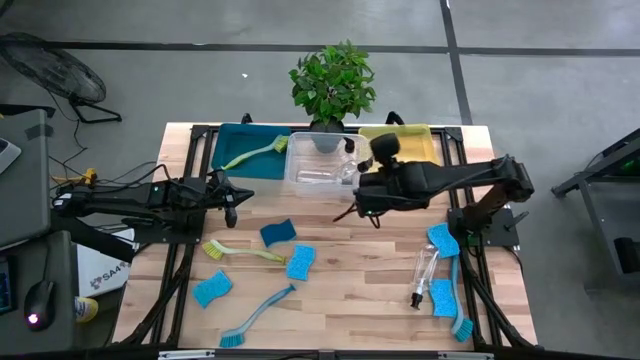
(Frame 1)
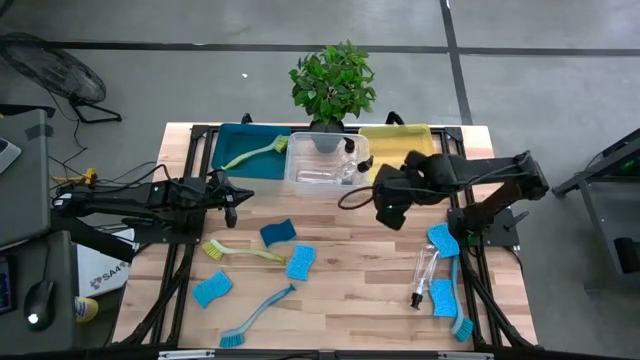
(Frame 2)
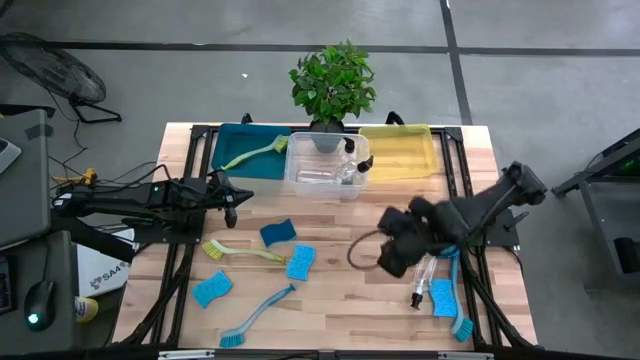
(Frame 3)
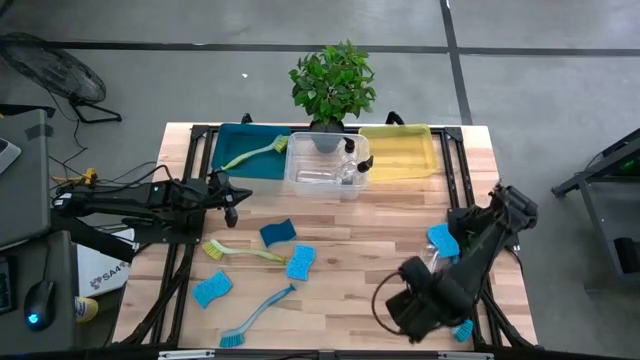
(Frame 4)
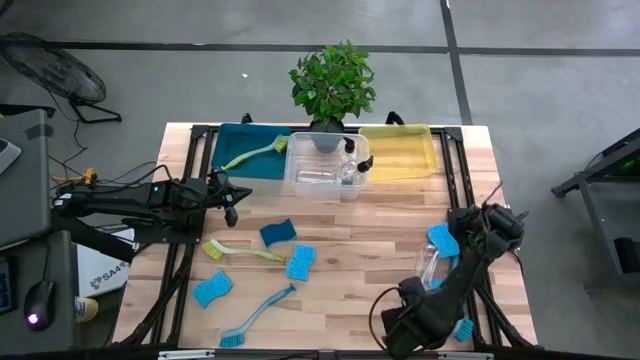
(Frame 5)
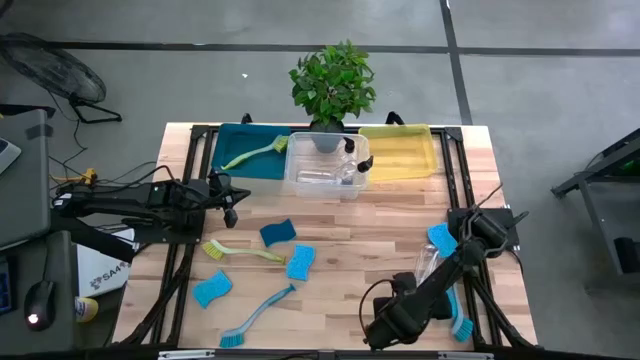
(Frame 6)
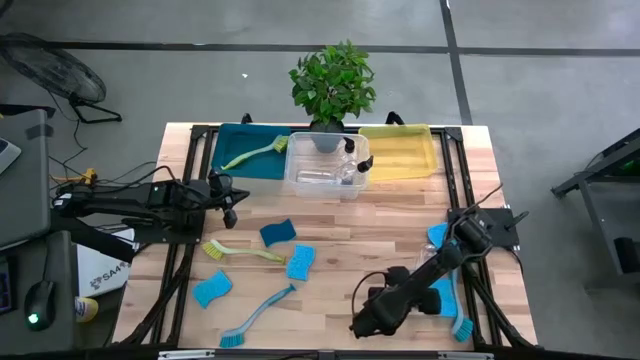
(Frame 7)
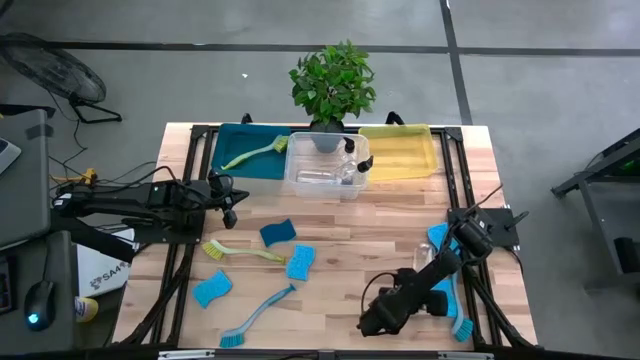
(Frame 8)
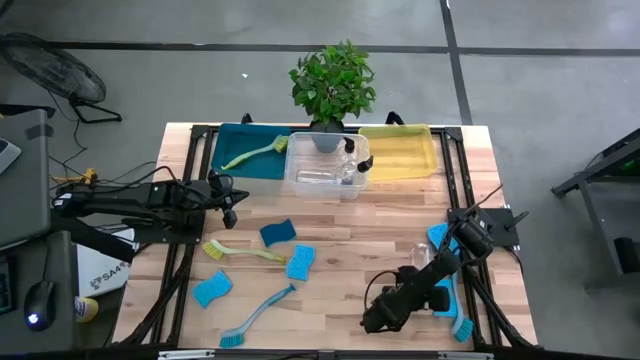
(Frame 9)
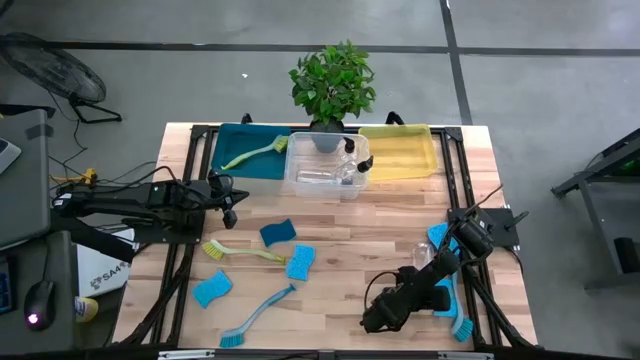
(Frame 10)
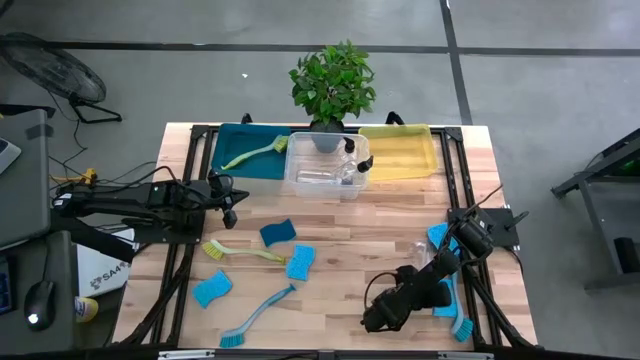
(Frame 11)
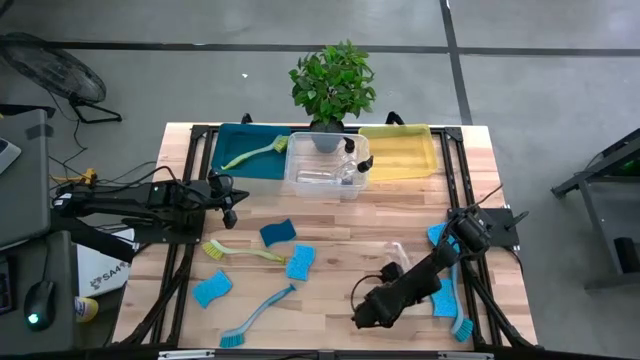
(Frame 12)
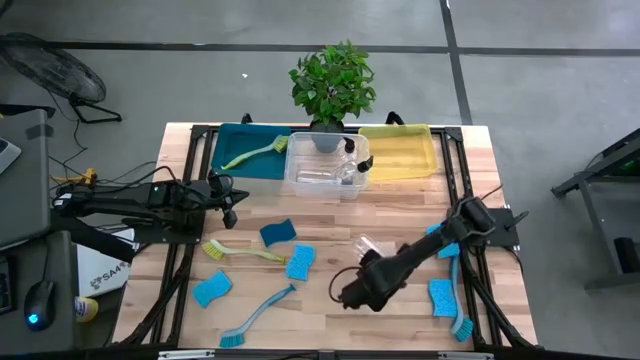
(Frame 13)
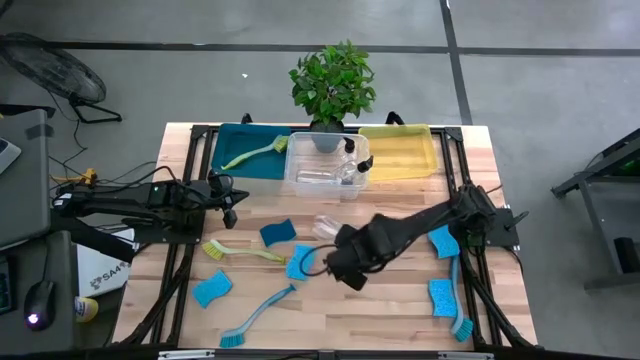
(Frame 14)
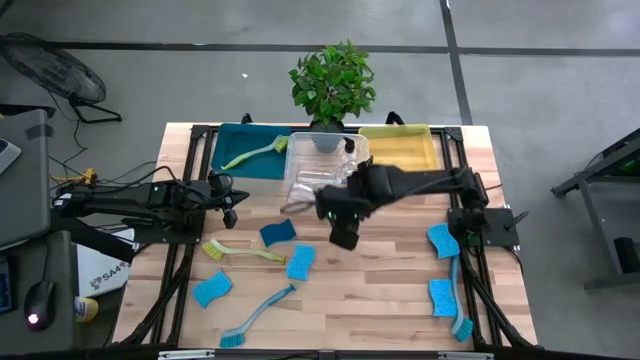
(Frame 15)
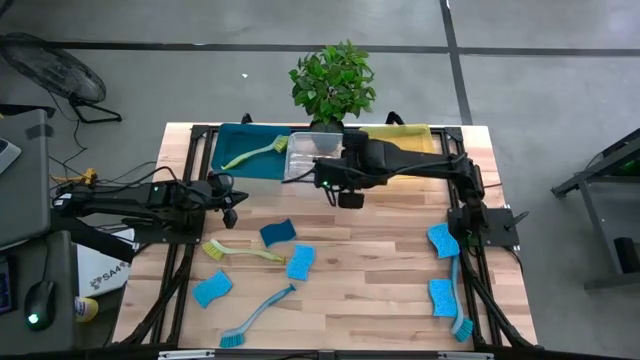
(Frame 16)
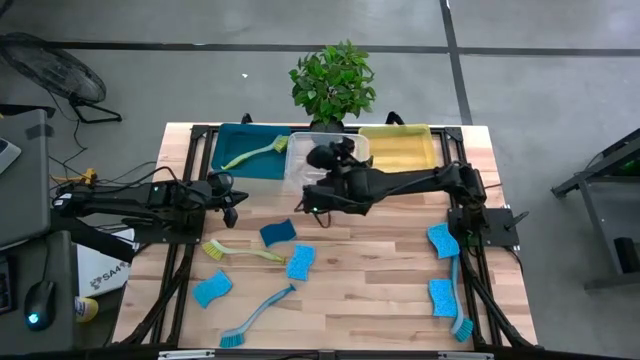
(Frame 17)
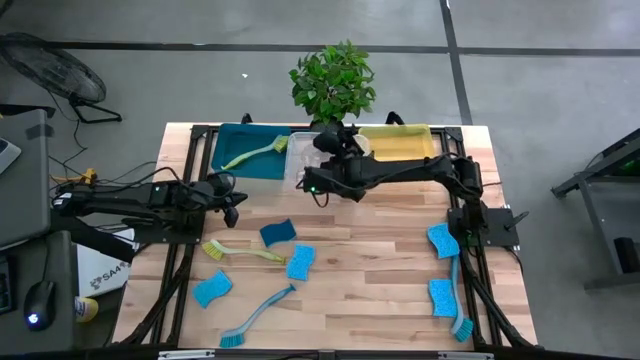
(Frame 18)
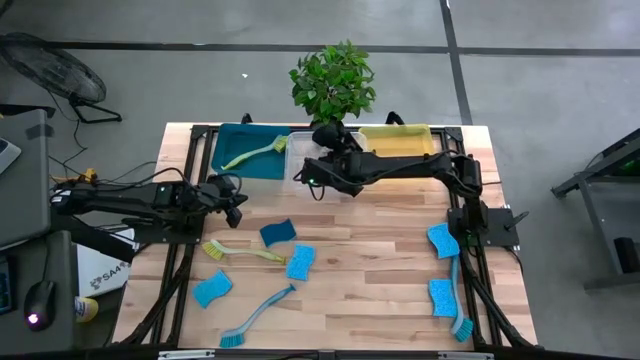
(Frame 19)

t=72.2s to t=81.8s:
Task: Pick & Place Kitchen Sink Supplies
Put the transparent soap dispenser into the transparent bin

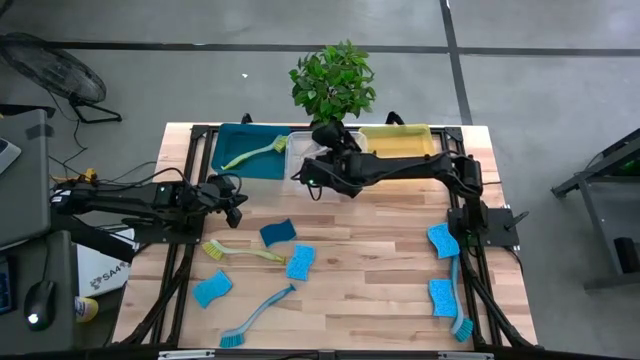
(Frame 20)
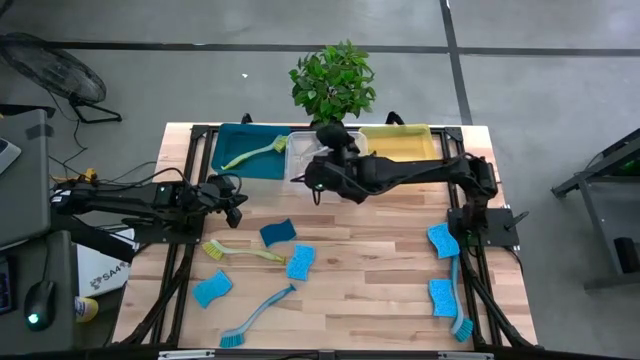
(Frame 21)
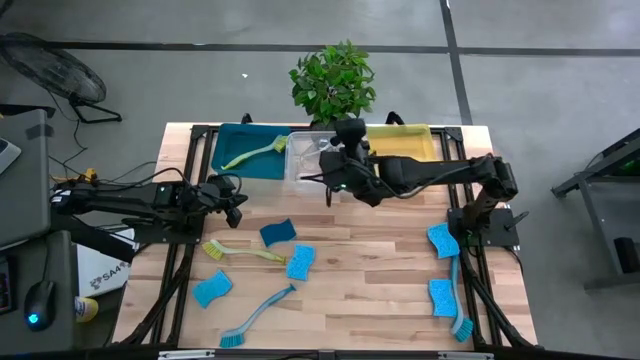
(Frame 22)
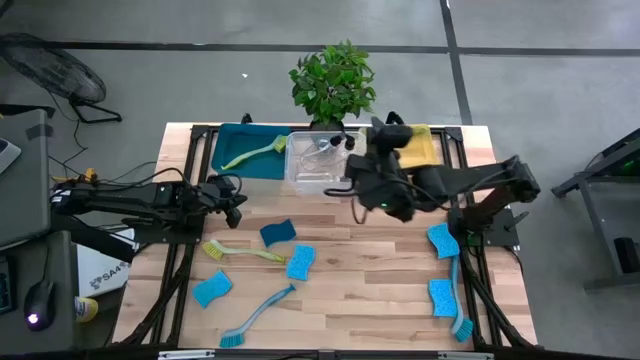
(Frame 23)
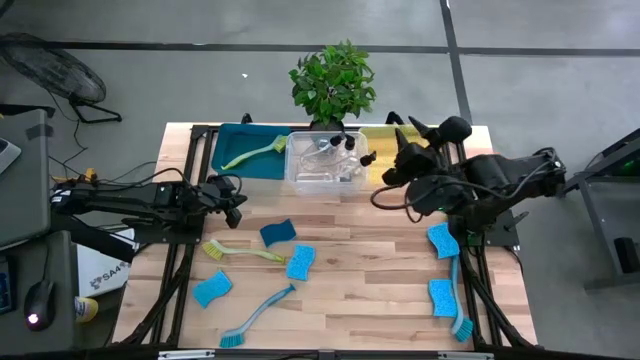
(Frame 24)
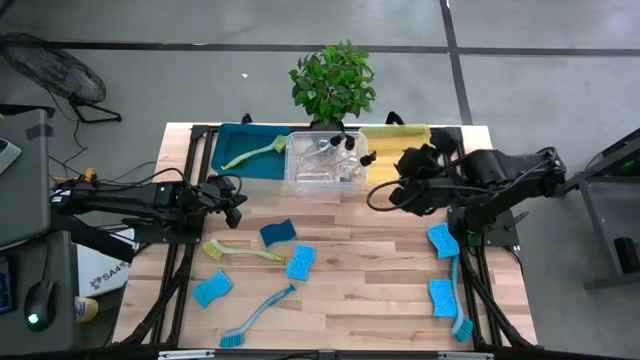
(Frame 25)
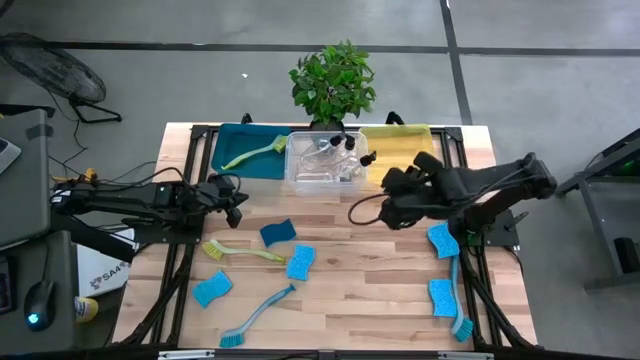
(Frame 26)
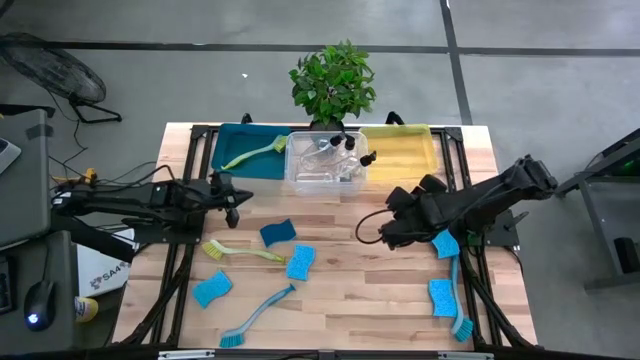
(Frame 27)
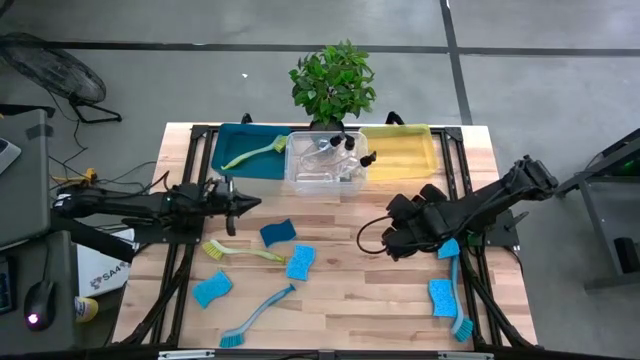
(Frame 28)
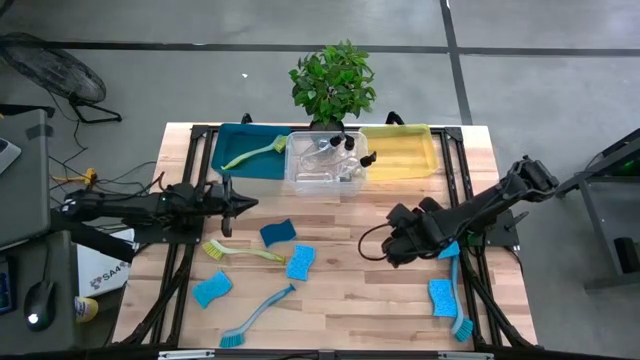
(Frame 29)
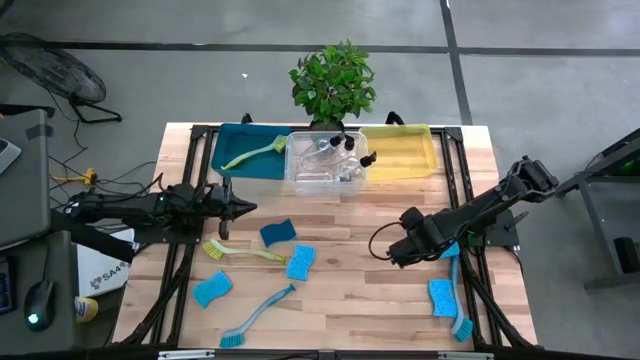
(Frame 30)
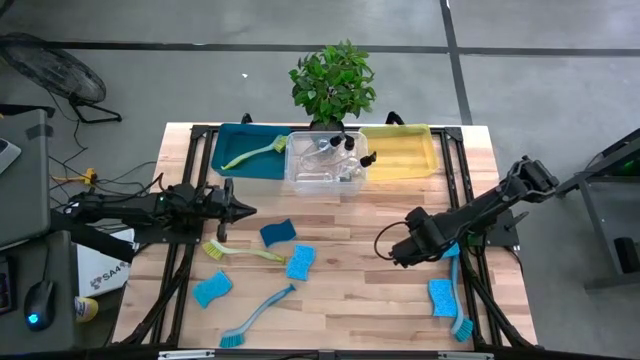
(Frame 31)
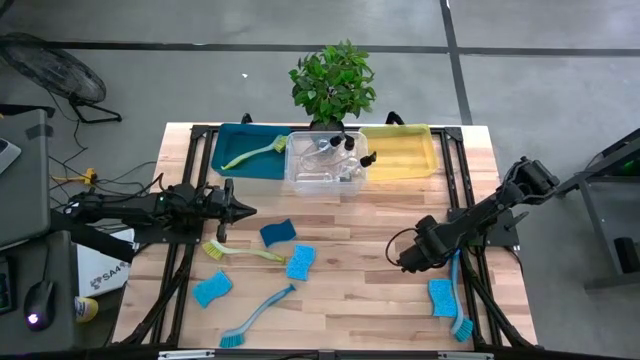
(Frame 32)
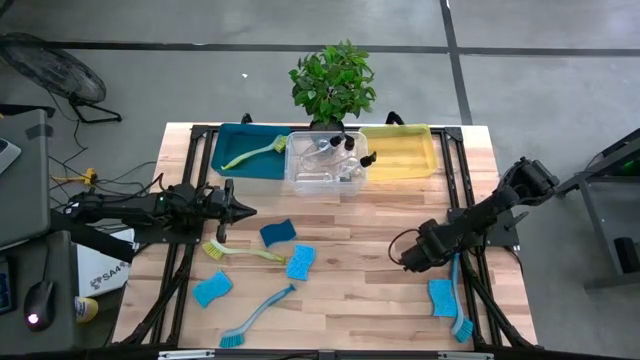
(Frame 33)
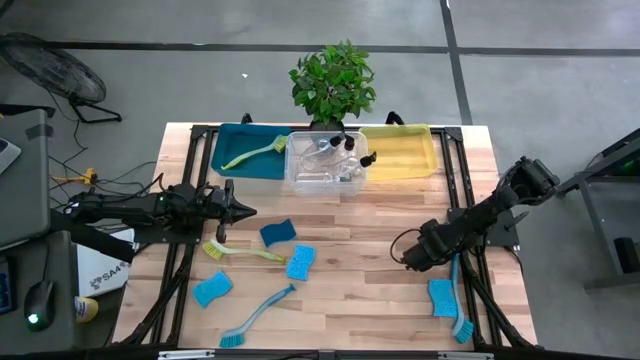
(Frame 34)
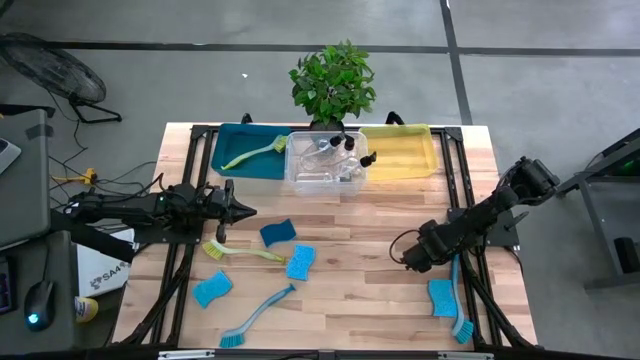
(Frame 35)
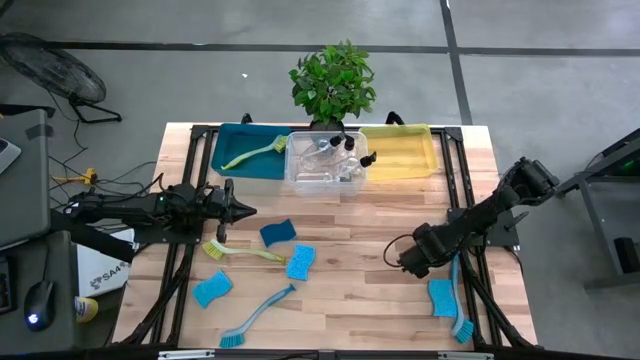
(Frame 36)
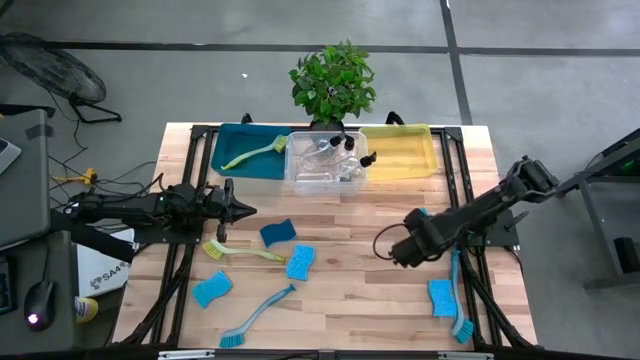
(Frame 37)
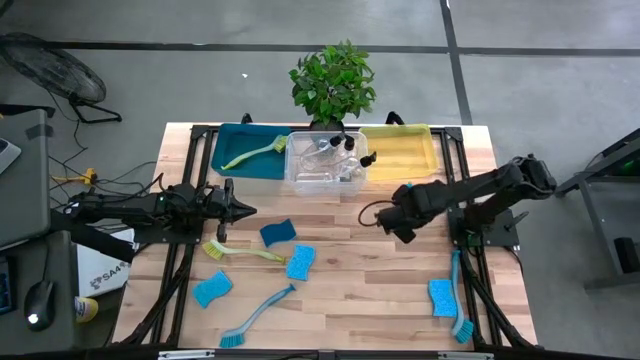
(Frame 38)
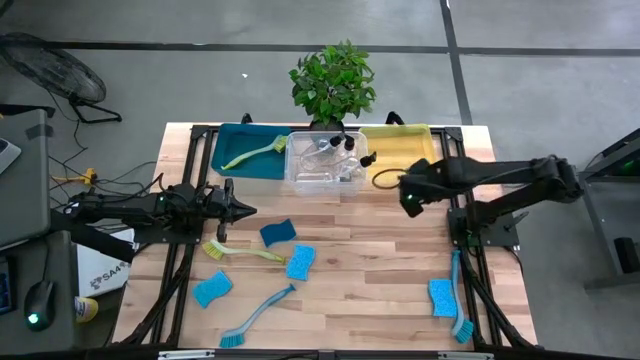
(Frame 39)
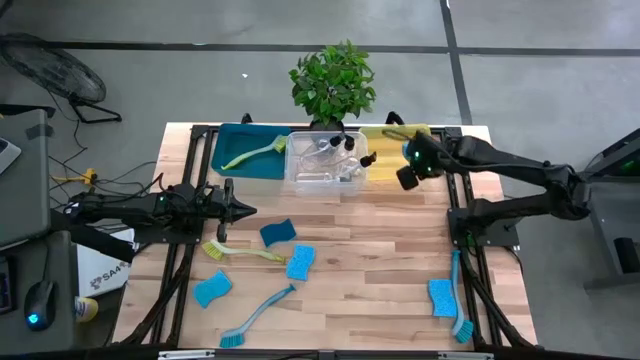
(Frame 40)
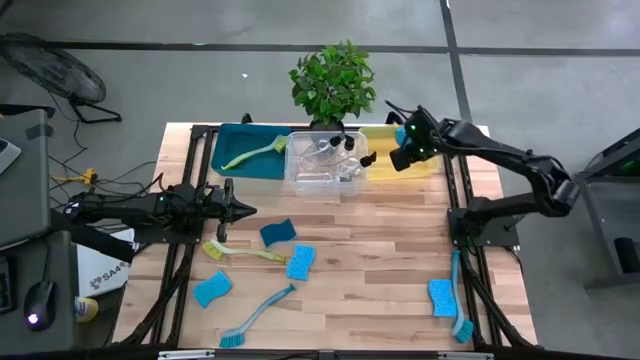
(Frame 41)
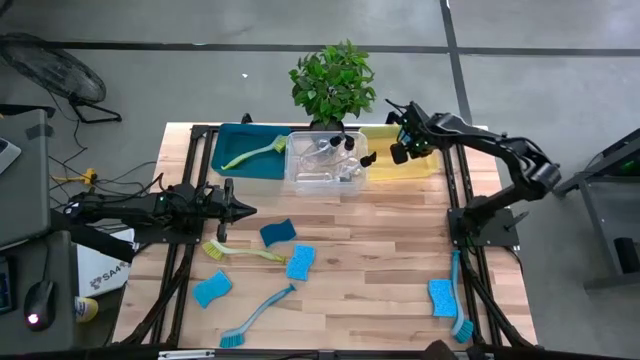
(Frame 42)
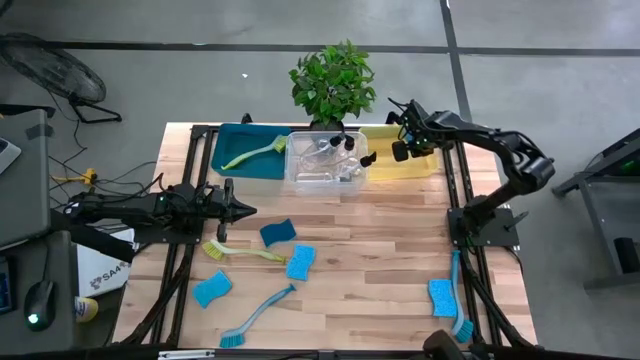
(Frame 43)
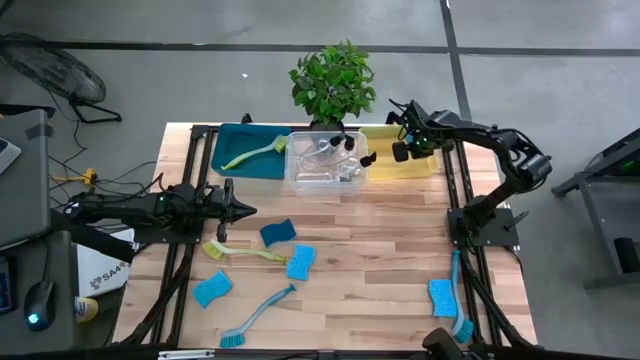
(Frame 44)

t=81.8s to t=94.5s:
Put the light blue sponge into the yellow bin
